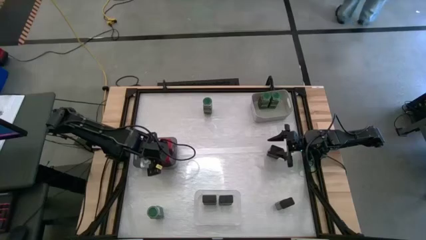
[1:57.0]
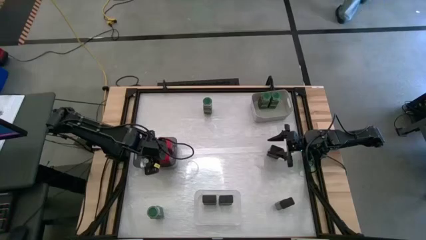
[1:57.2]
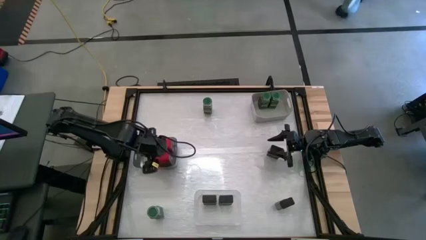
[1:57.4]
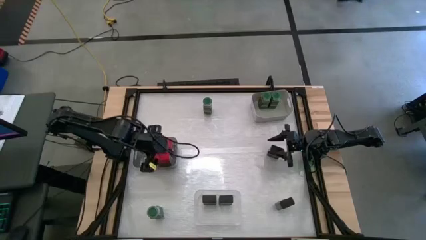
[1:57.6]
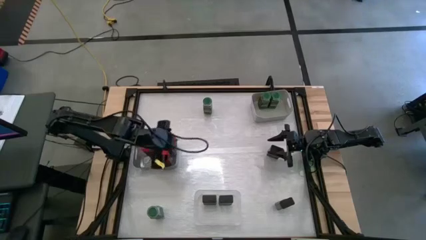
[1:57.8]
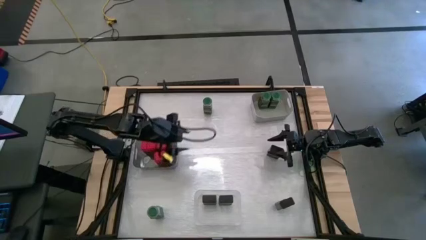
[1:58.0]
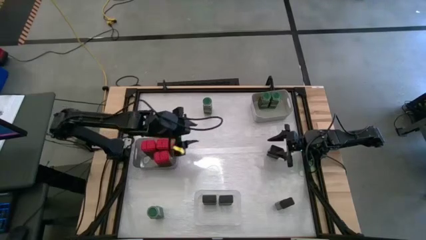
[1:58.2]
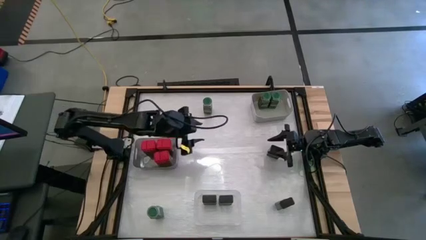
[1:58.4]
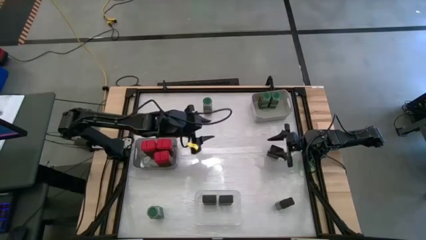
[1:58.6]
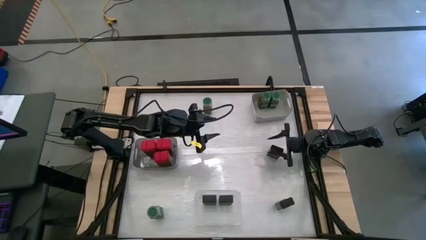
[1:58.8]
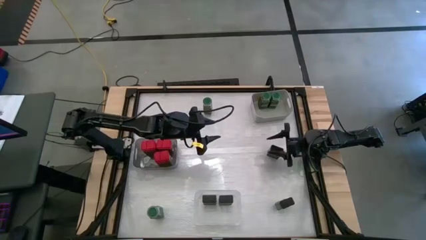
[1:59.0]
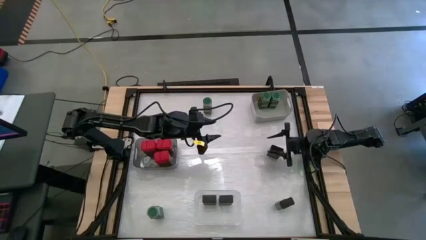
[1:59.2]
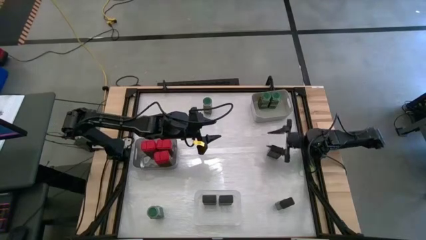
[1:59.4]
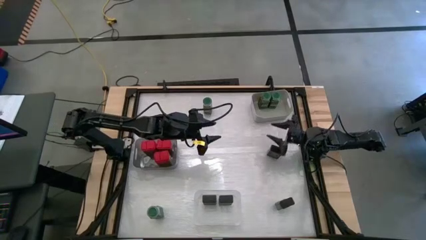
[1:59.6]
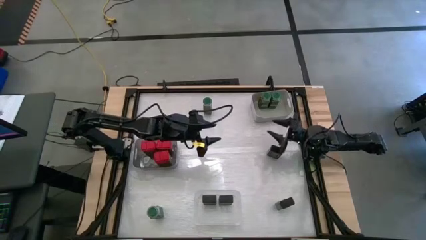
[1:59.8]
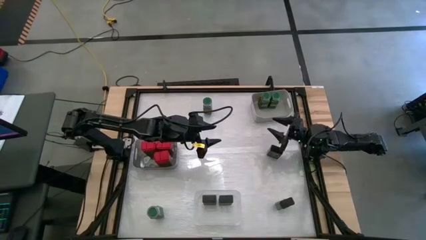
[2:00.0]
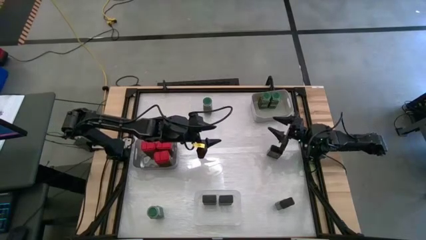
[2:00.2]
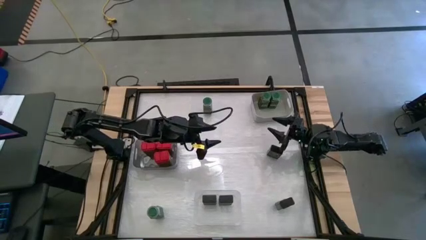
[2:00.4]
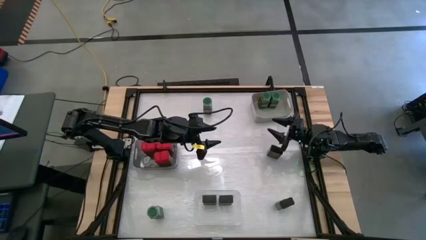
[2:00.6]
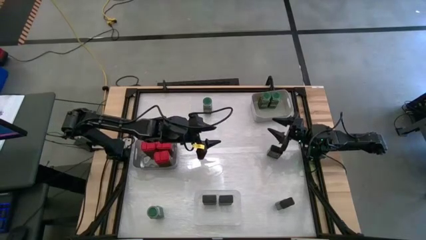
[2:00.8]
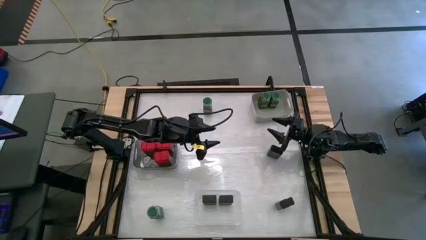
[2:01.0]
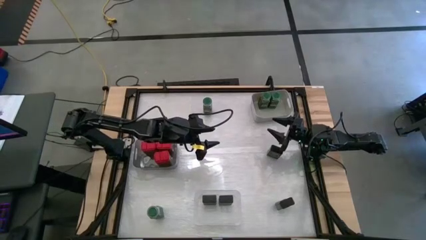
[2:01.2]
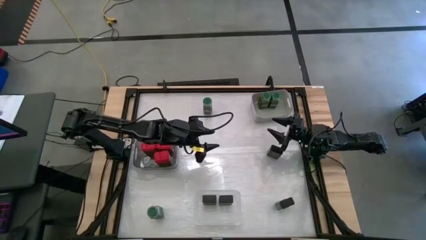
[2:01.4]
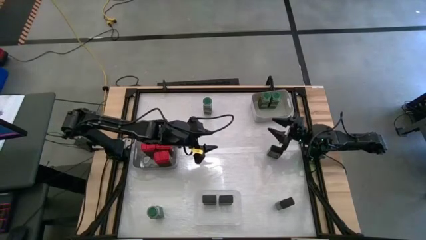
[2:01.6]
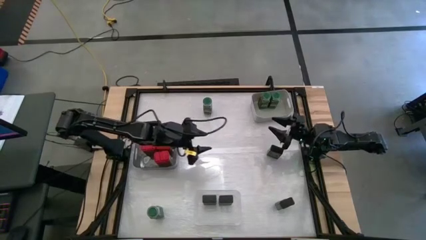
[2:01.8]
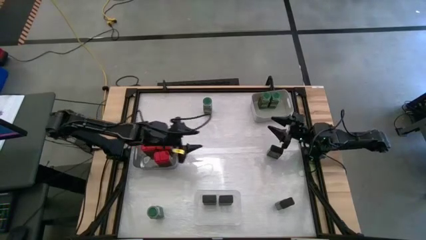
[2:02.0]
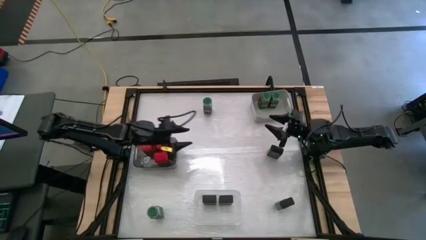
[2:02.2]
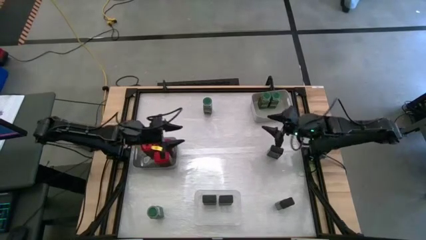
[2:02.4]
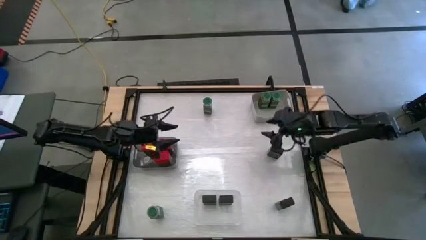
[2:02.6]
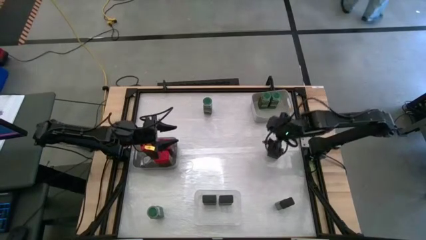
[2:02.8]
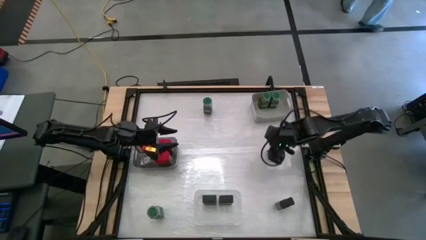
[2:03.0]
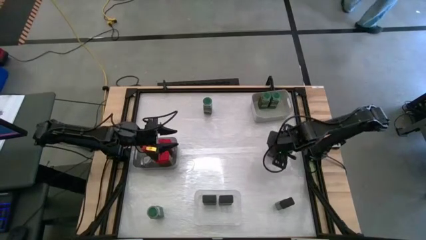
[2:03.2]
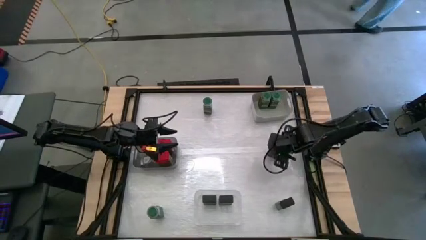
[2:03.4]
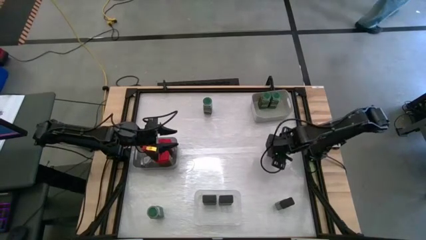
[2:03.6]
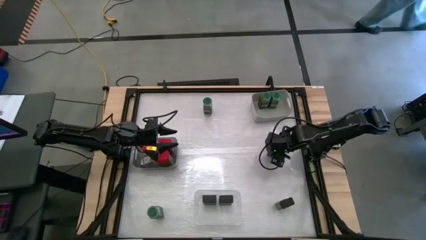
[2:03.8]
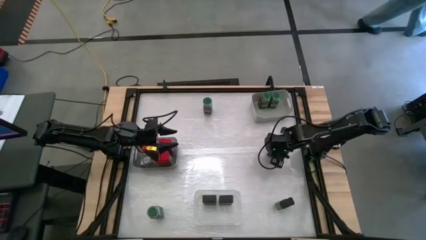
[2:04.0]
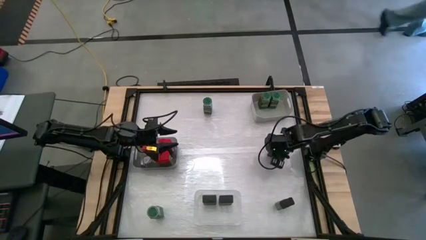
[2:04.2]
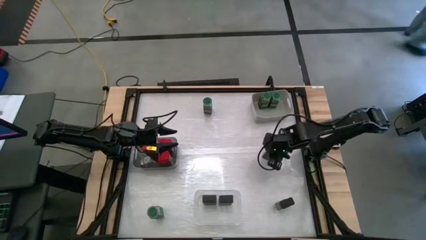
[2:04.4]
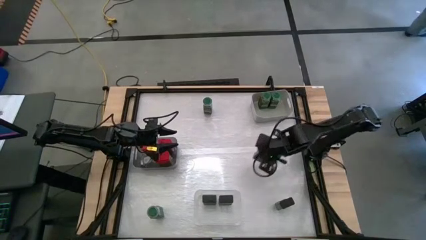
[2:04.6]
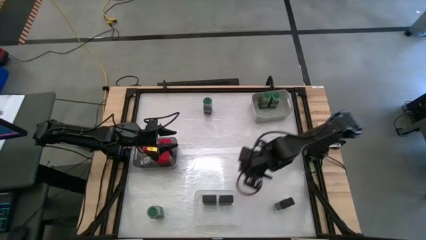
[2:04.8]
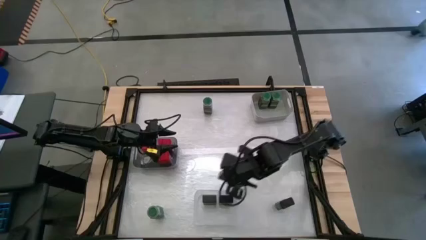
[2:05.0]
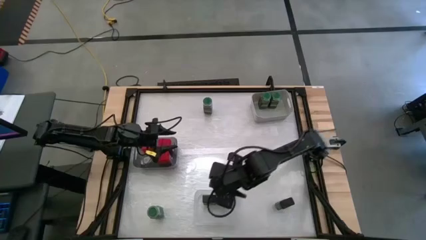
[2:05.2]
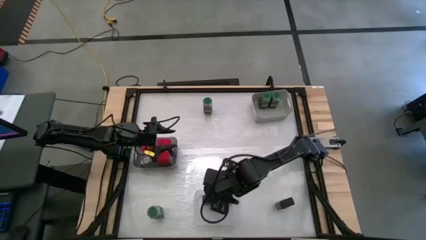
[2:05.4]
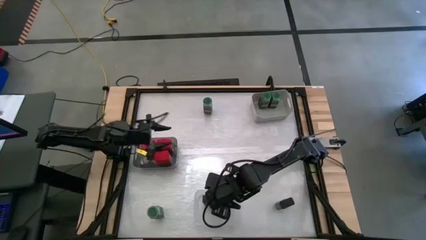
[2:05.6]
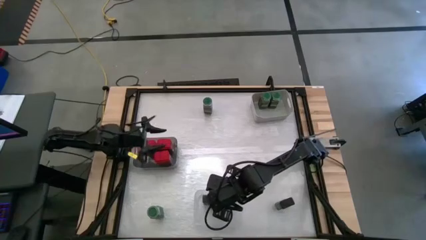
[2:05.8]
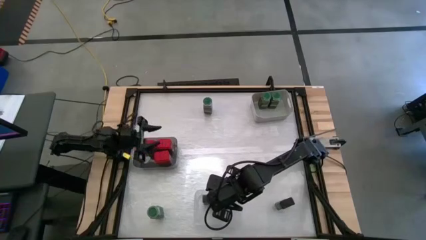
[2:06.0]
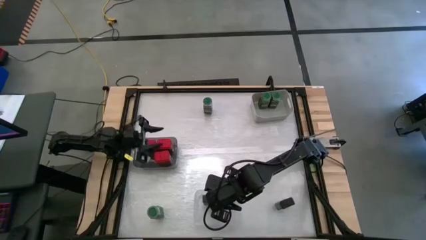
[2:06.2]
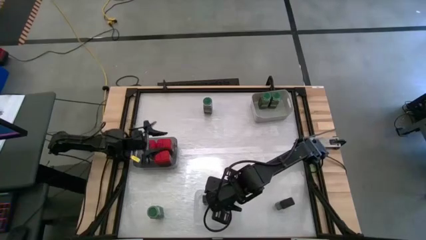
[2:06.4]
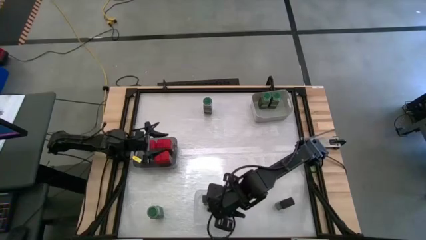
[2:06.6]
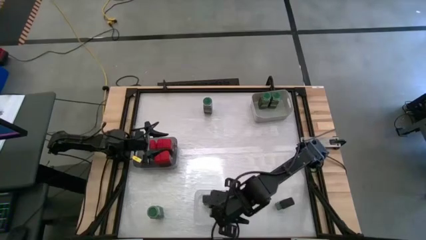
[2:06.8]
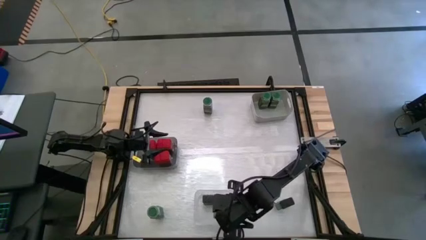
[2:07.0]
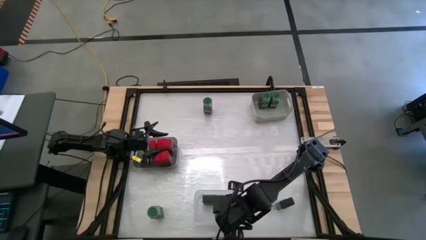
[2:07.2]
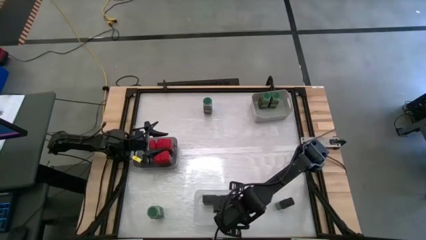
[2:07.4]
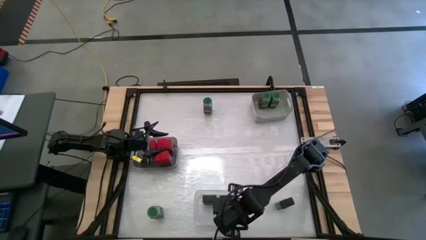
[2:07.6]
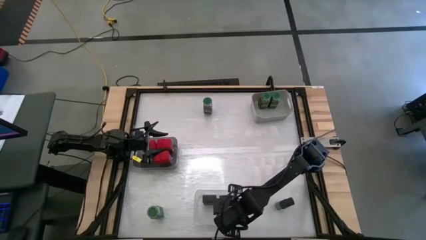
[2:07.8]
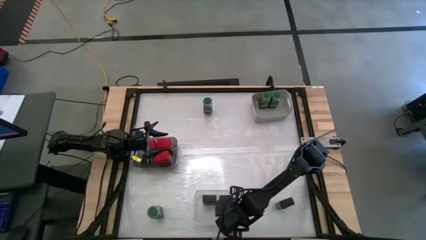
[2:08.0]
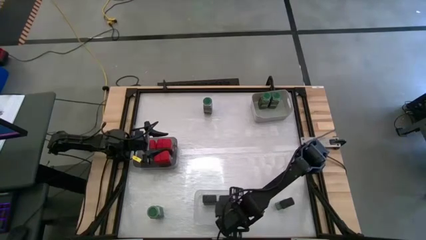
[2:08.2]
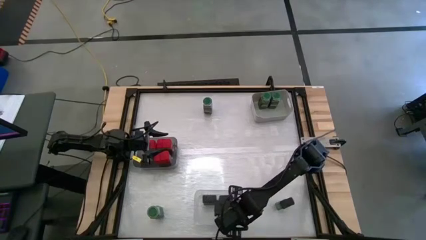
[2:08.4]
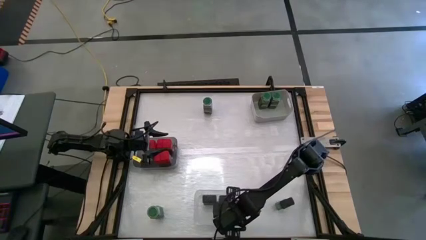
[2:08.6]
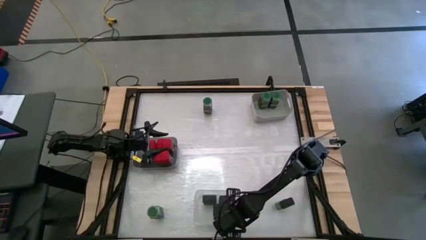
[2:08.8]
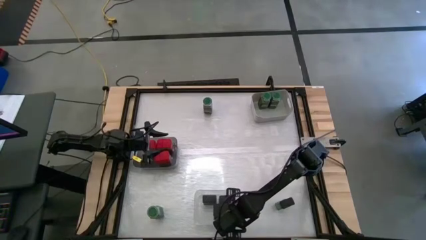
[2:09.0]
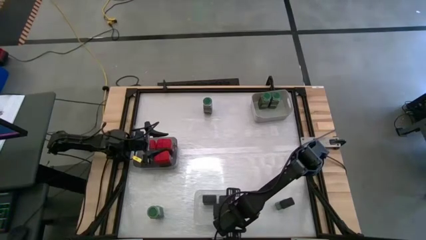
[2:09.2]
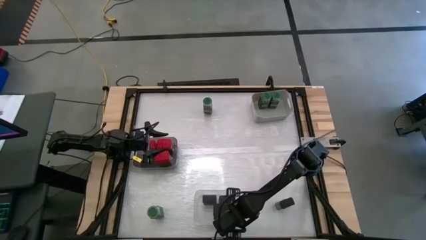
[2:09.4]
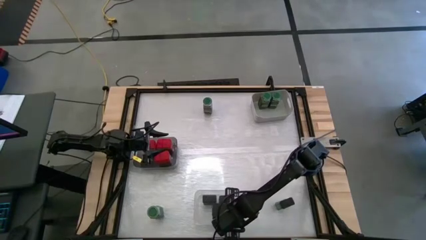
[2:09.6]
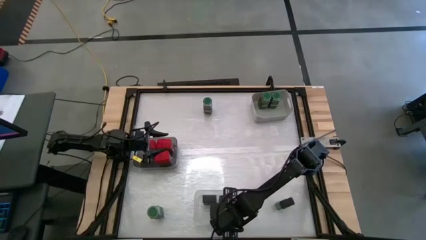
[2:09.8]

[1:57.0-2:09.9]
Task: Sort spices by type
Put the top black seasoning can into the transparent bin

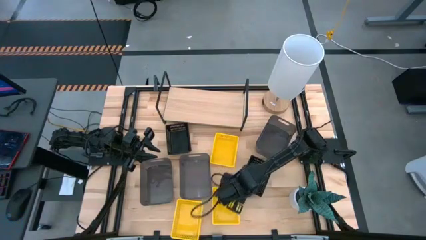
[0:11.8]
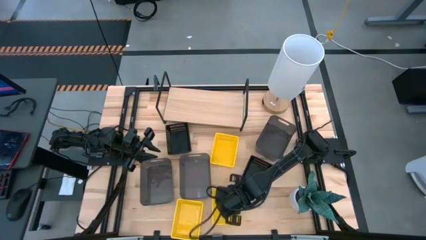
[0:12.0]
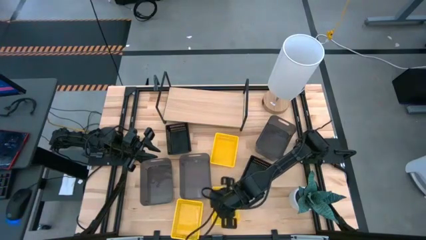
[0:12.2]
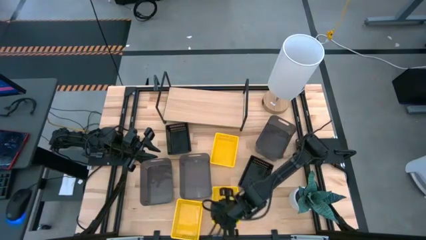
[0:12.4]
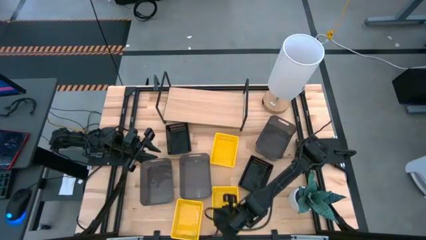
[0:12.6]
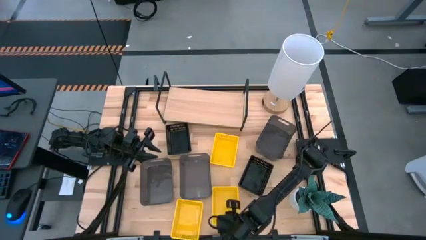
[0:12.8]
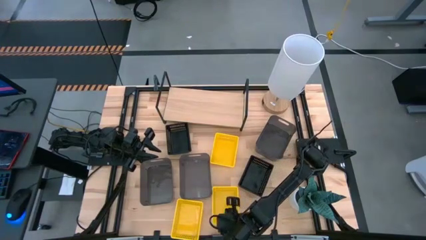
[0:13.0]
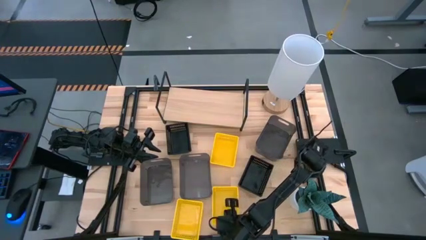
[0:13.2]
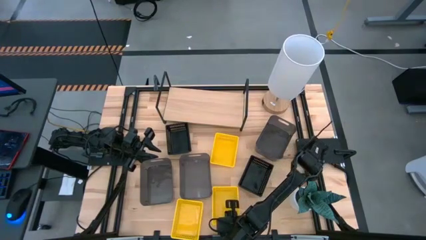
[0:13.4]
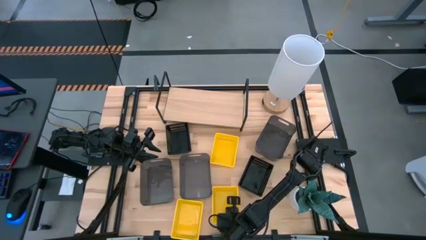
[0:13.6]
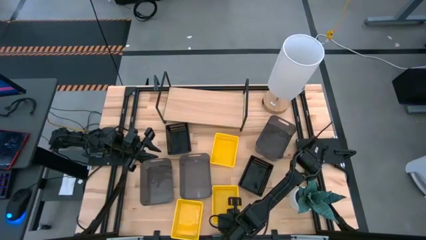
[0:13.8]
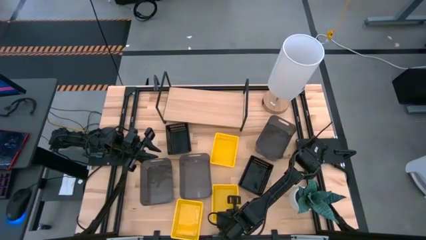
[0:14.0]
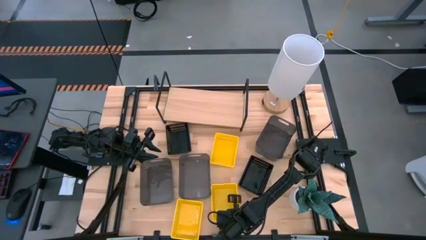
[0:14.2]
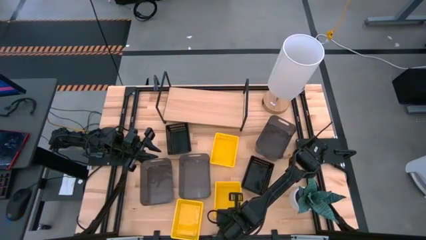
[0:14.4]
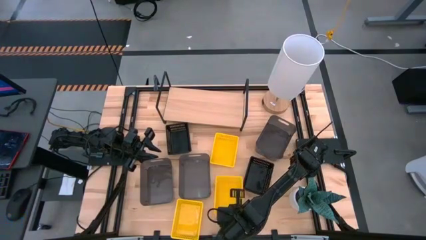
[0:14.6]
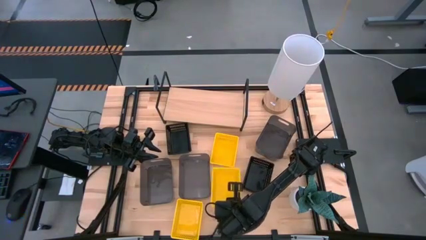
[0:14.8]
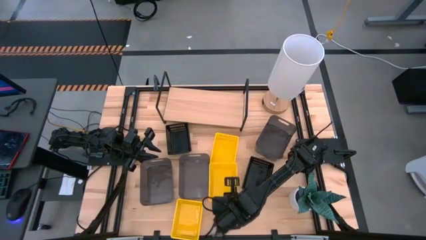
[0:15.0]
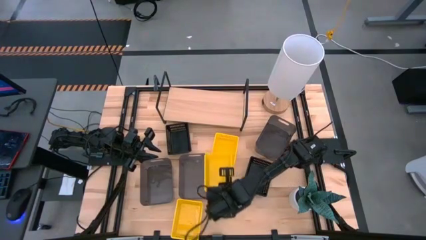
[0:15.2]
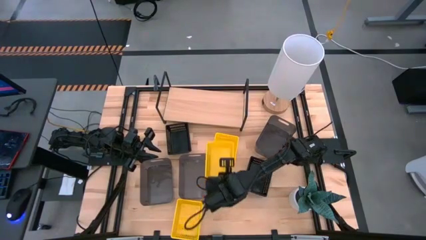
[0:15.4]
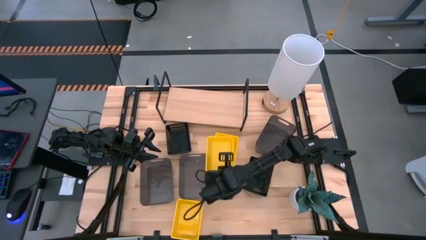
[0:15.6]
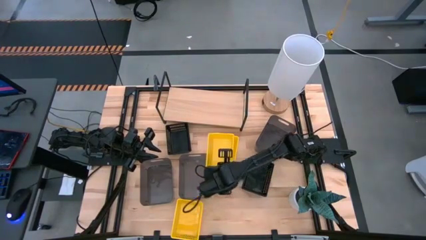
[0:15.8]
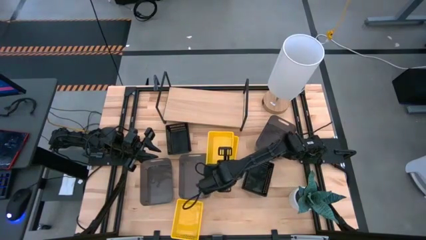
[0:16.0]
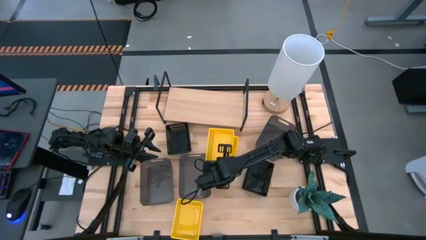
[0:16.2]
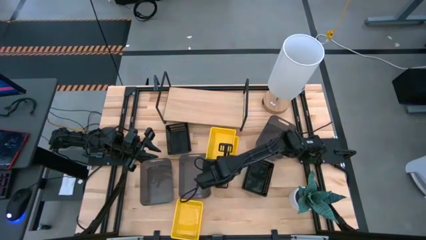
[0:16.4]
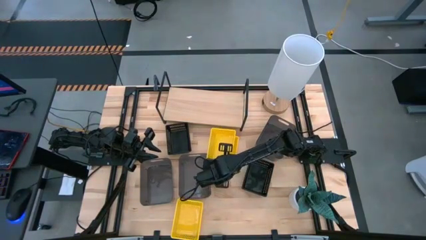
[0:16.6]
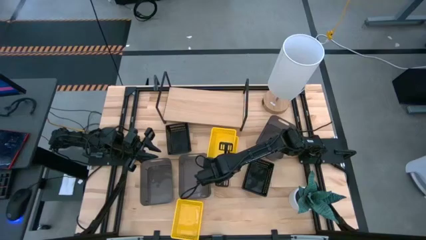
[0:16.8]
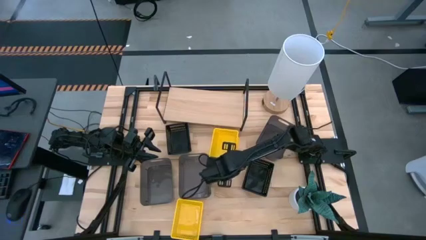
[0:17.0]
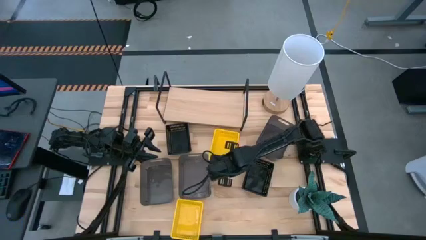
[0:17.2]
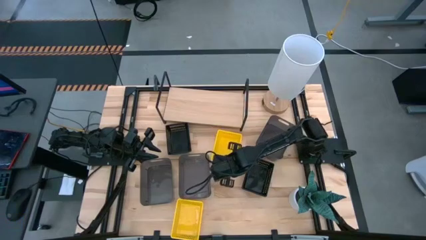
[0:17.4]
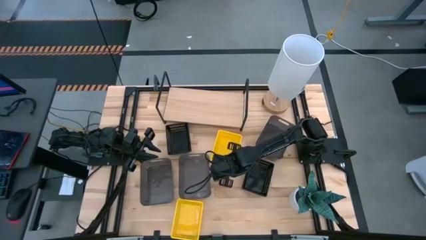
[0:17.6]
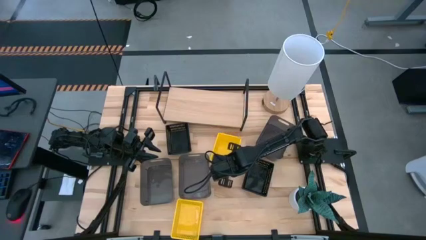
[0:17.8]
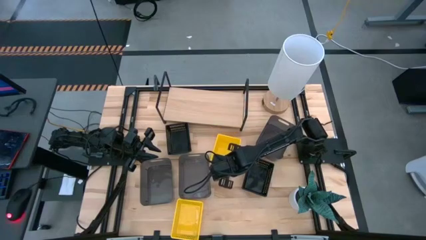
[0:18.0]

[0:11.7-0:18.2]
Task: Stack baskets on shelf by color
Stack the bottom right yellow bin on top of the top yellow bin
